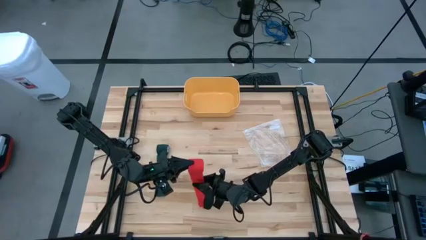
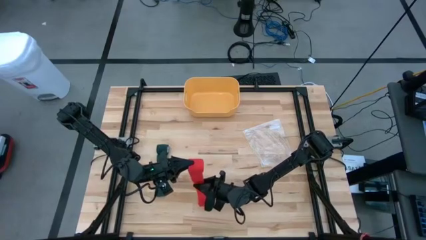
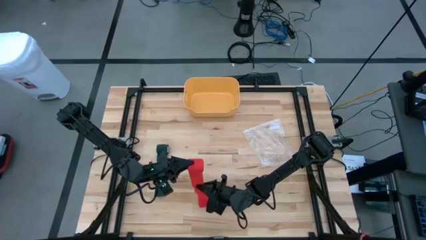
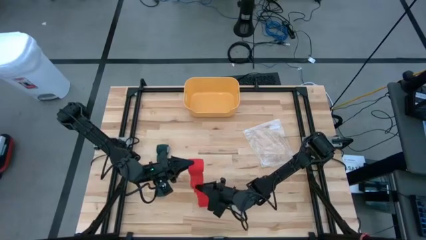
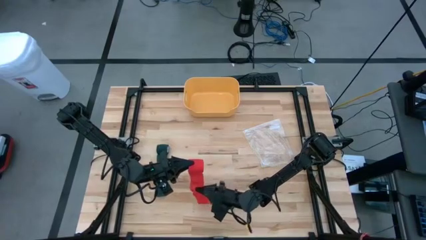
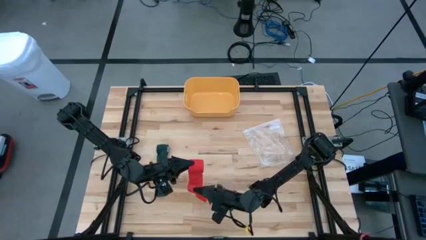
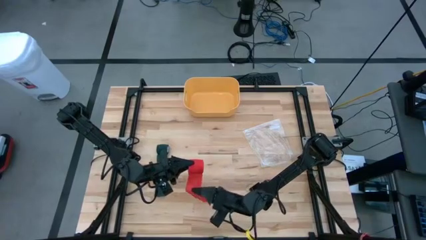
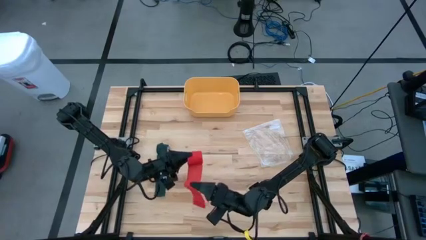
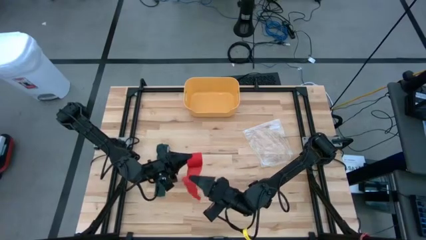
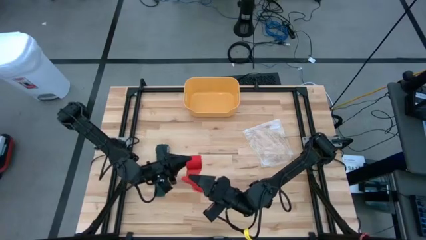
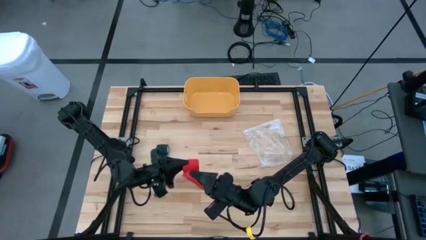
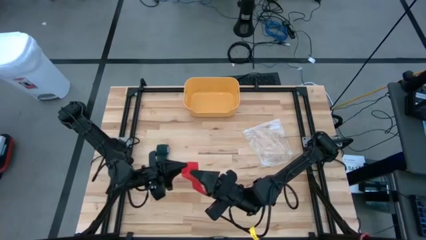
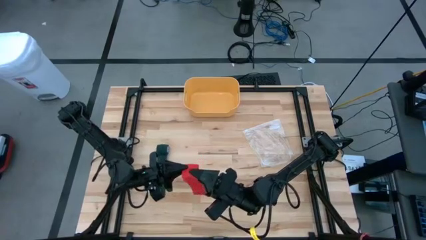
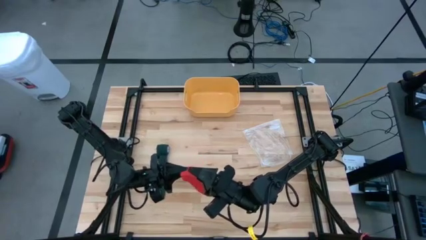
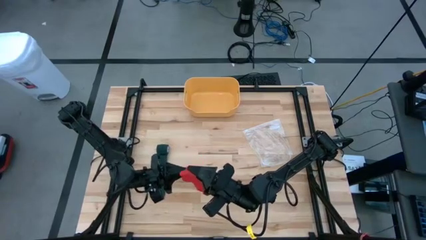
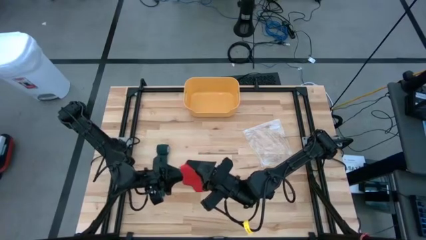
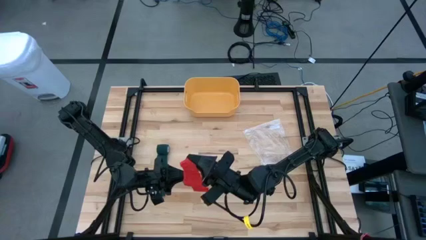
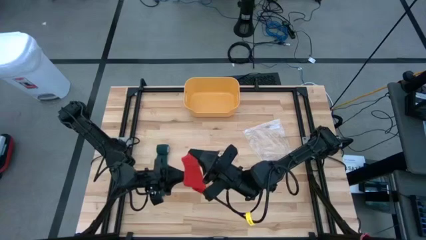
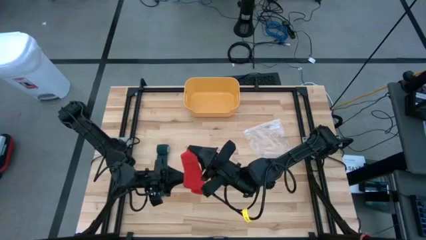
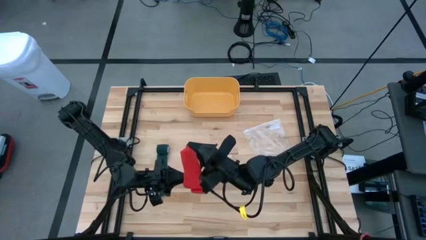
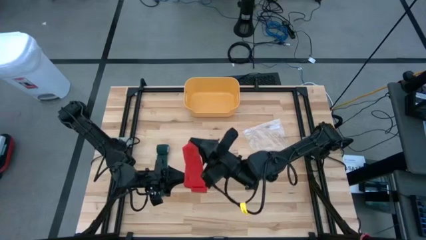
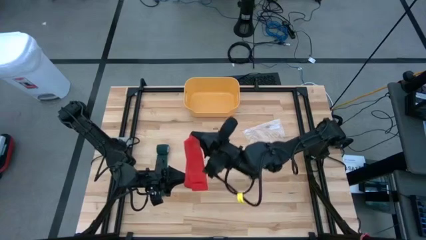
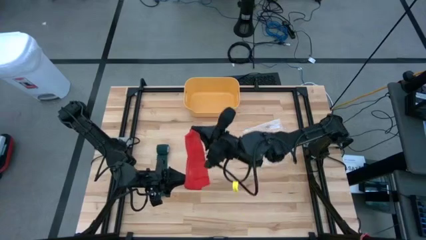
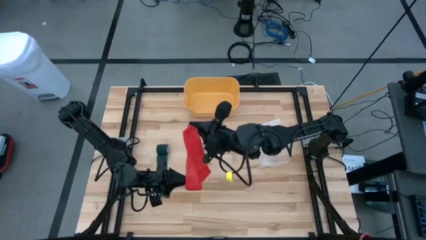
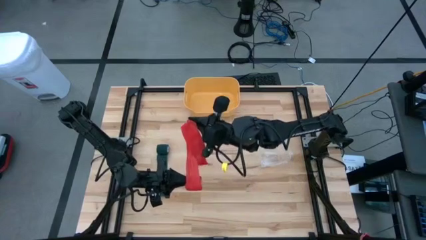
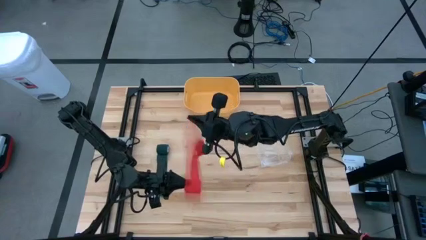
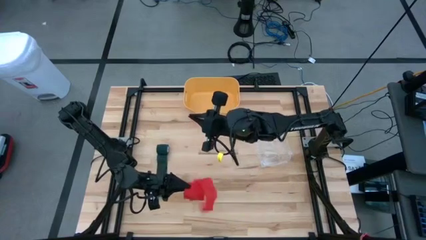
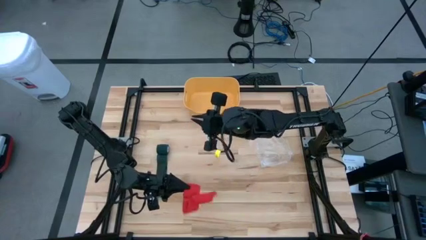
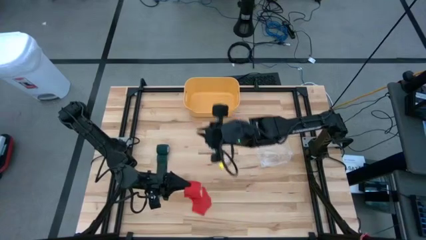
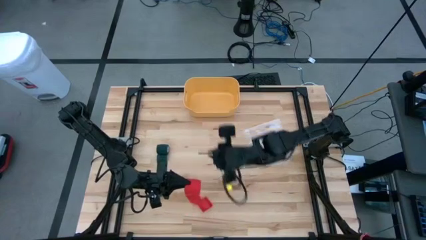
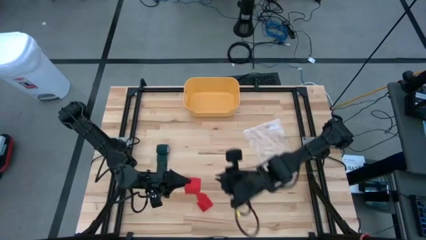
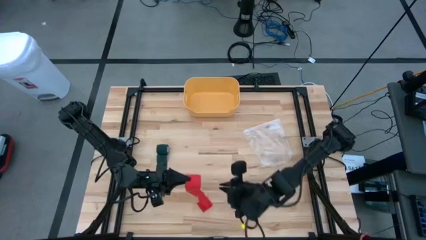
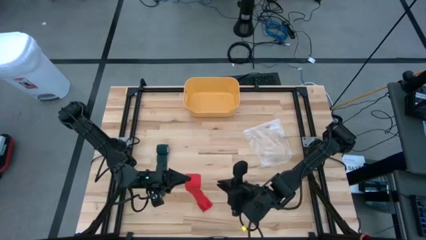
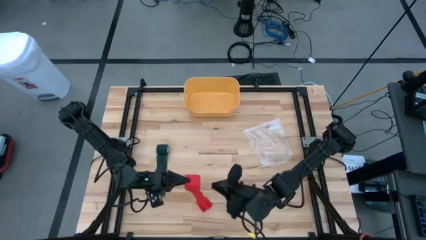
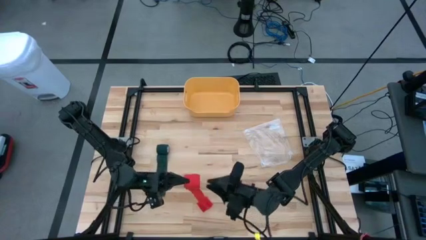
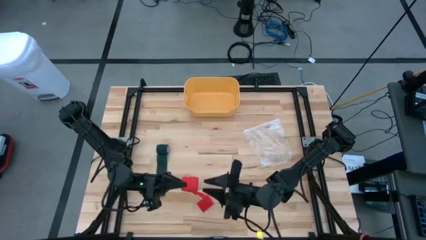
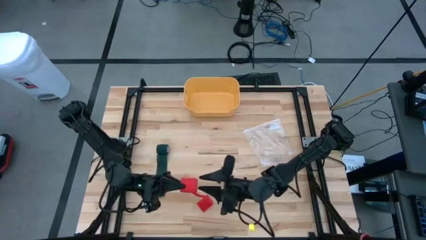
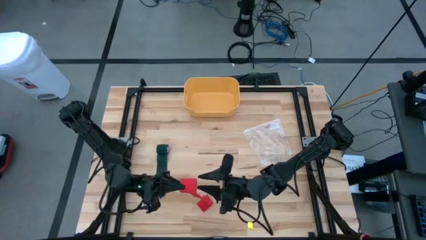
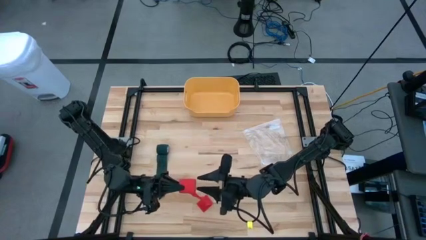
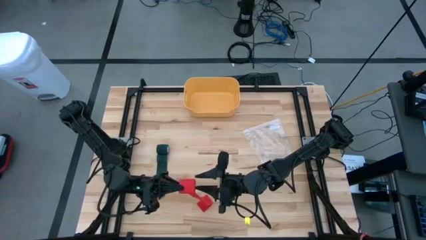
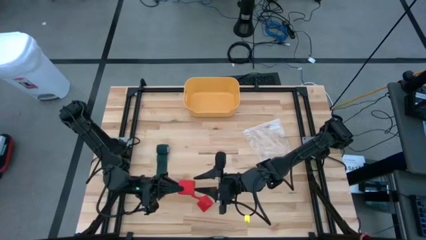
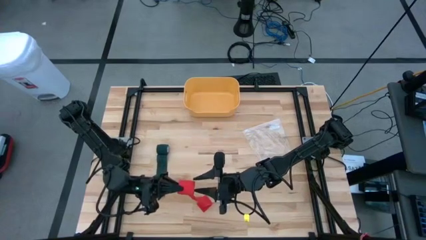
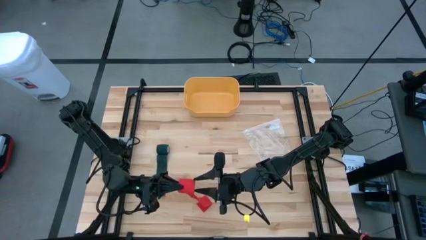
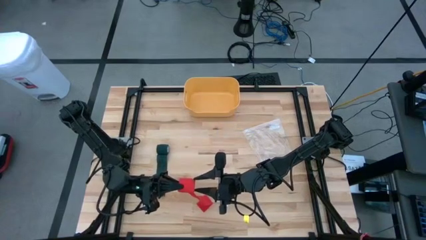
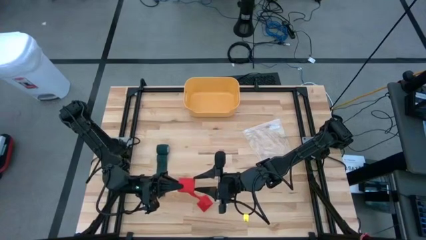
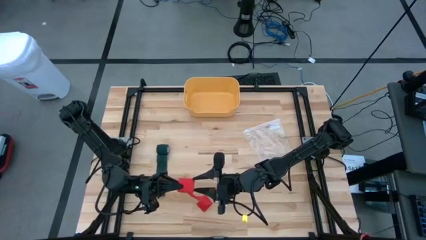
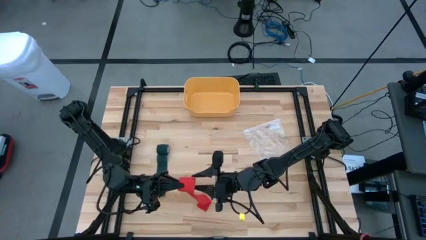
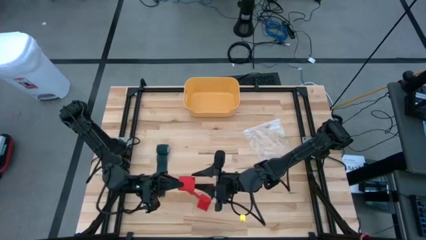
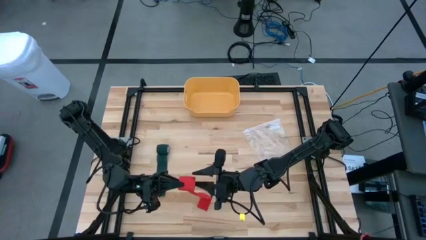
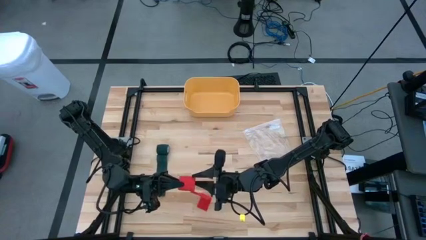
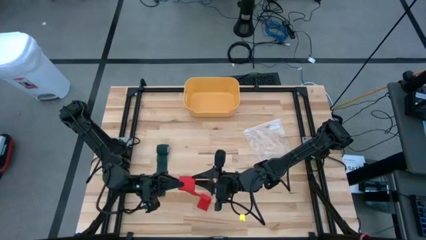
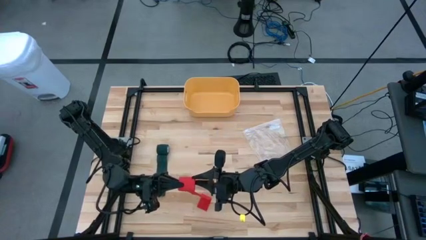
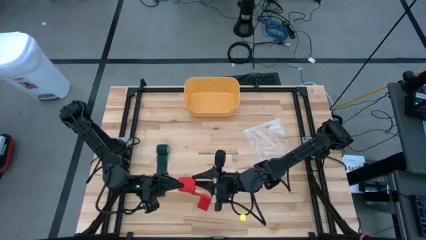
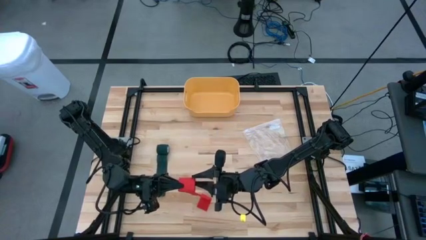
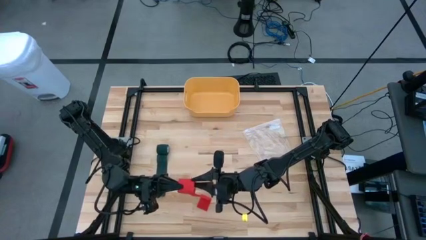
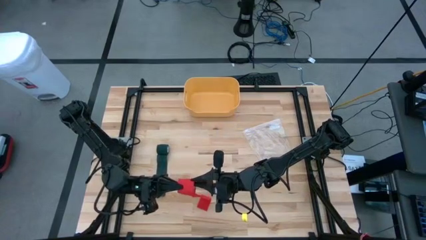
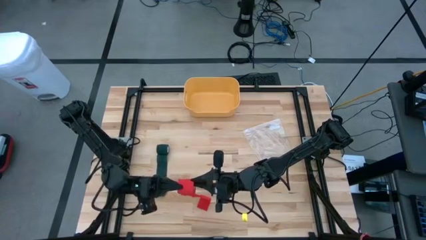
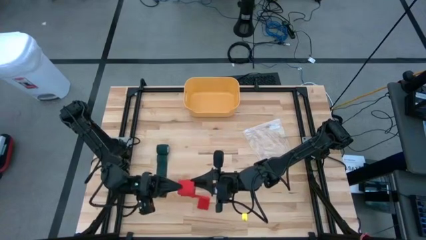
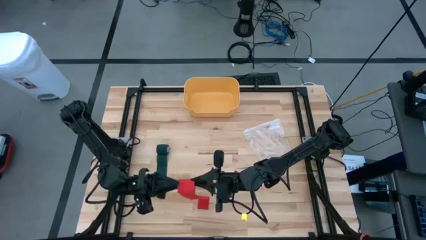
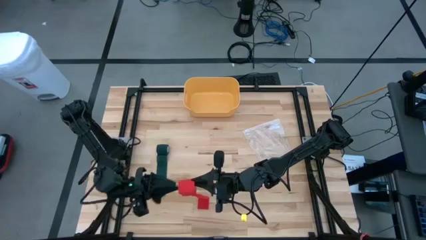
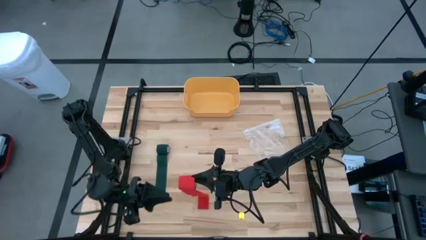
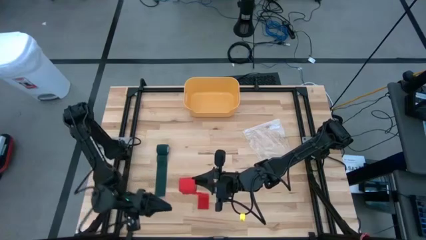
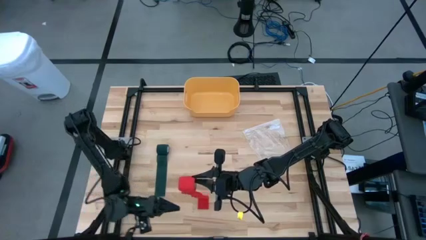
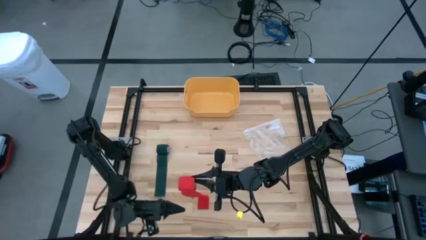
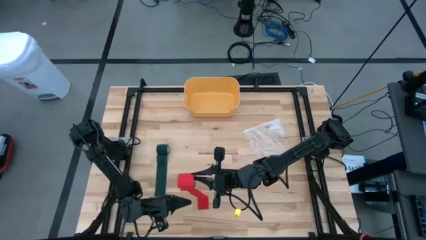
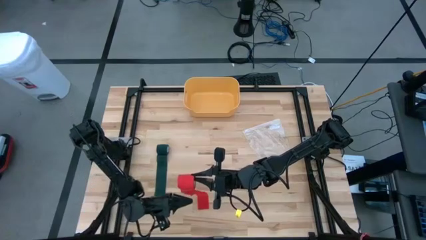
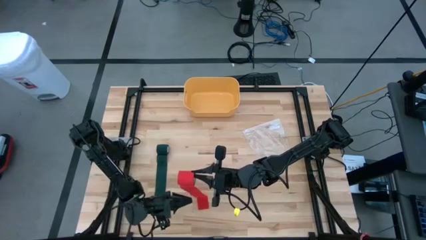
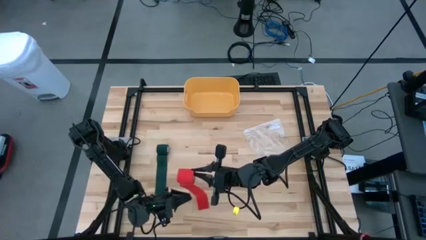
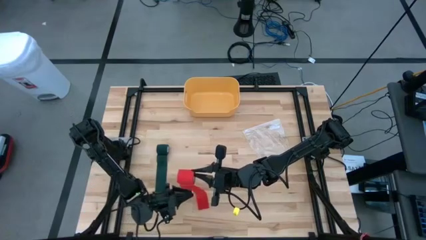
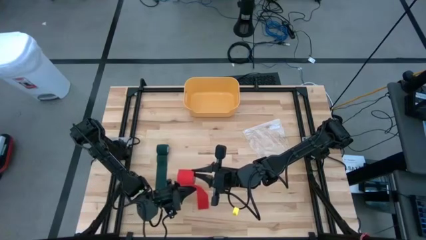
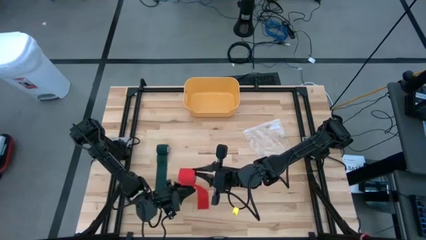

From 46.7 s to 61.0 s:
Task: Roll bandage
Roll the red bandage

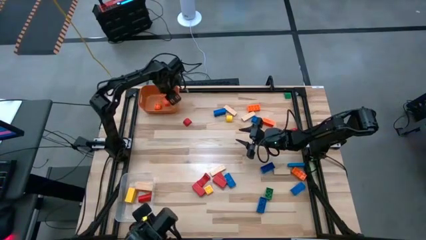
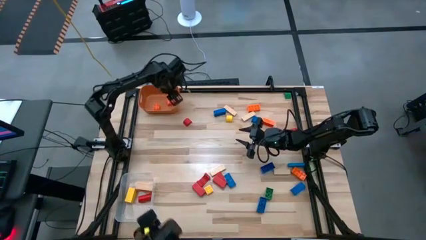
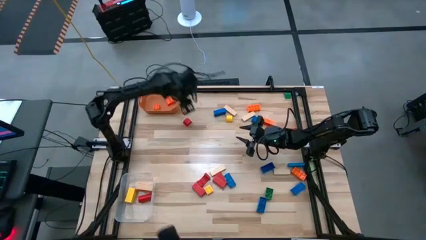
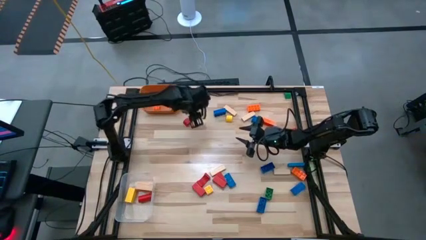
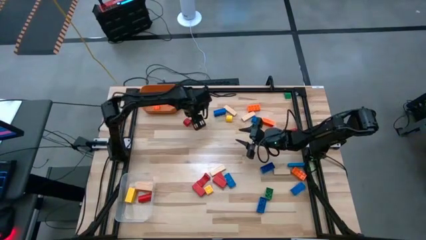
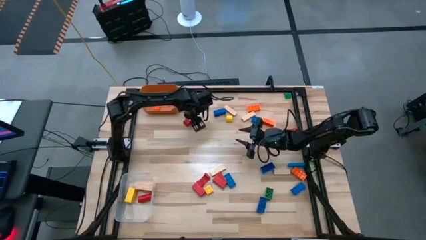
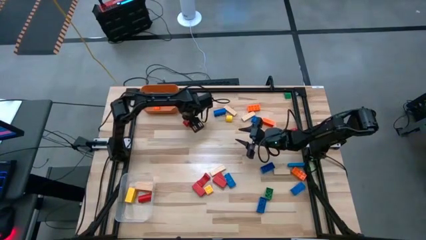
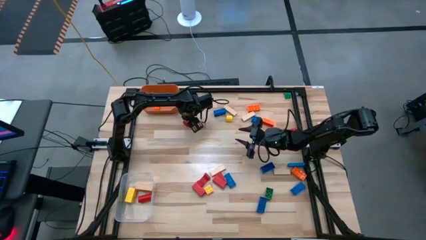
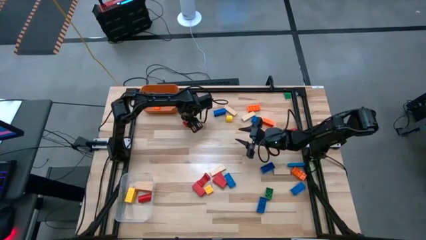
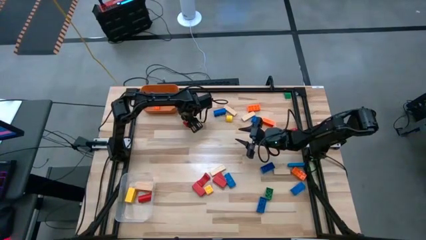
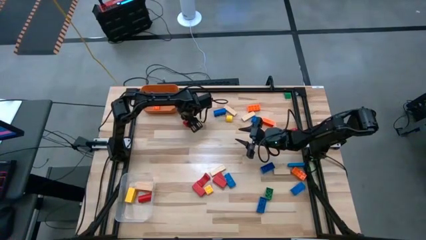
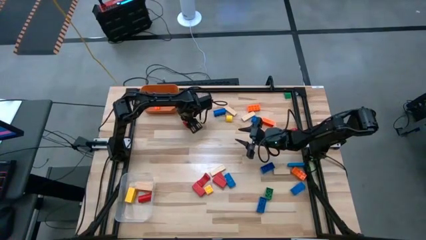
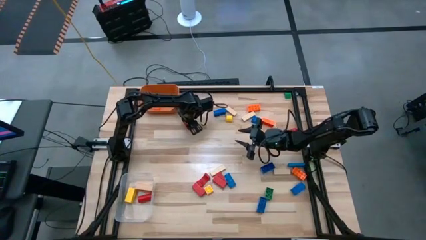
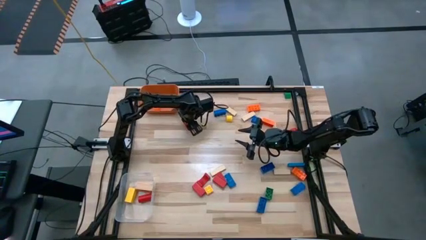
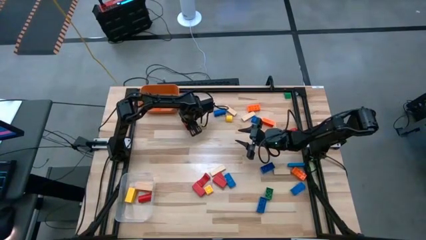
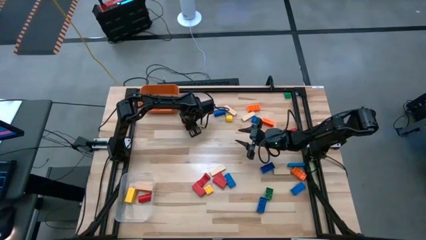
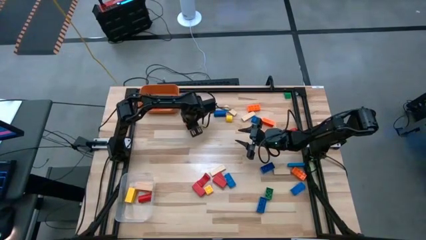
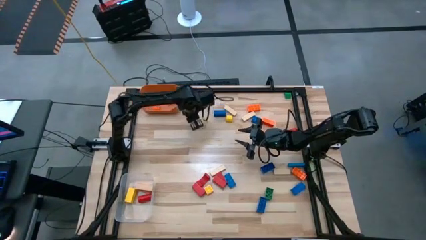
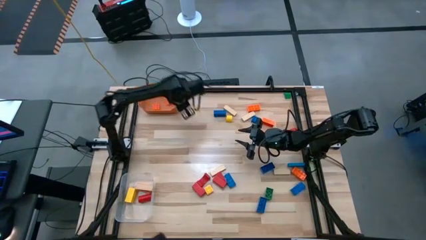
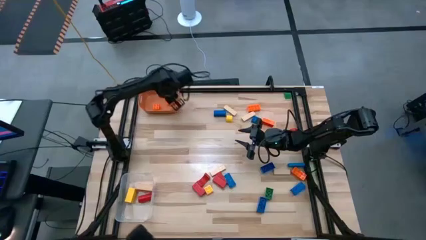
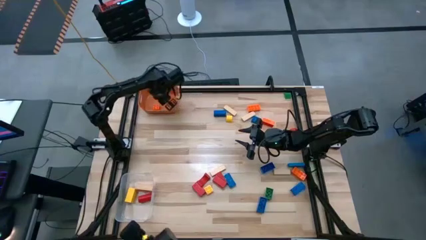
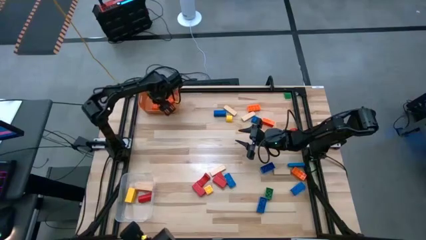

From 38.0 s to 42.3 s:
Task: Sort blocks by size
Put the small red block into the orange bin
